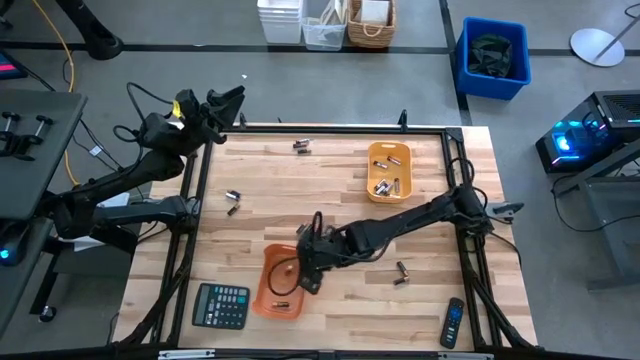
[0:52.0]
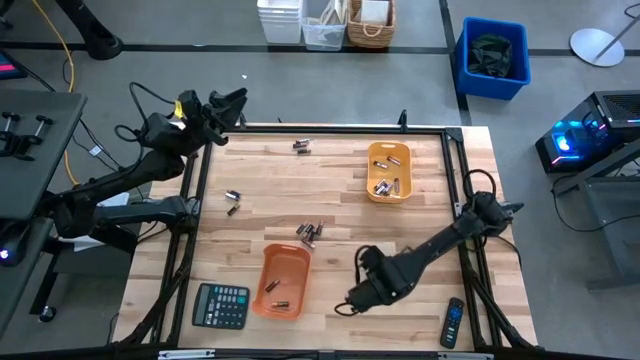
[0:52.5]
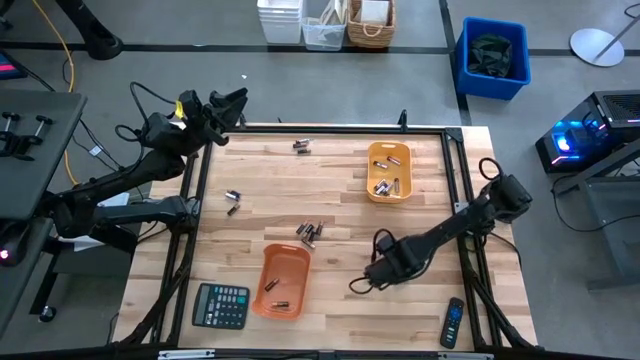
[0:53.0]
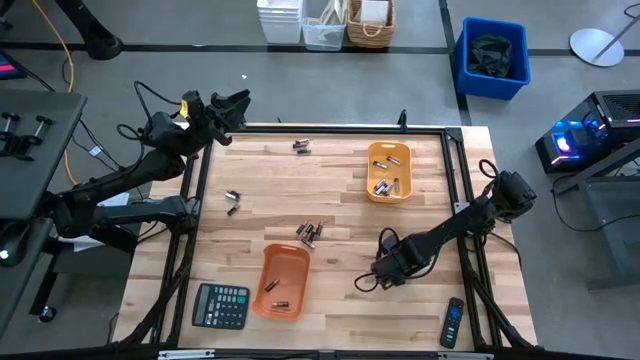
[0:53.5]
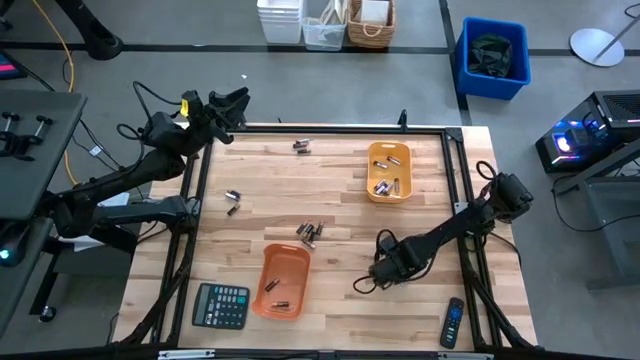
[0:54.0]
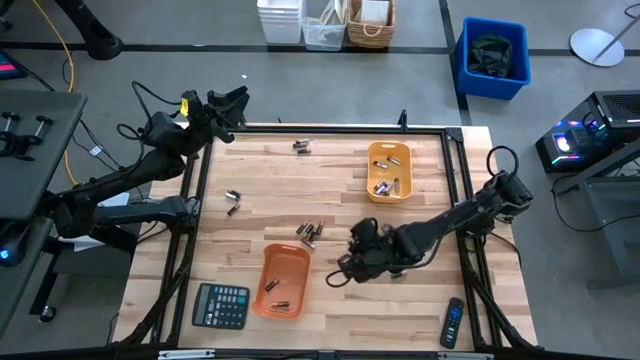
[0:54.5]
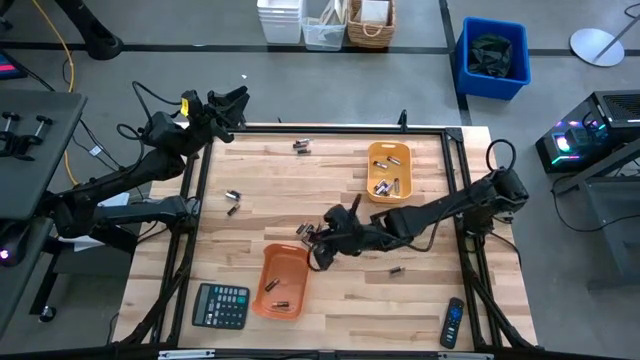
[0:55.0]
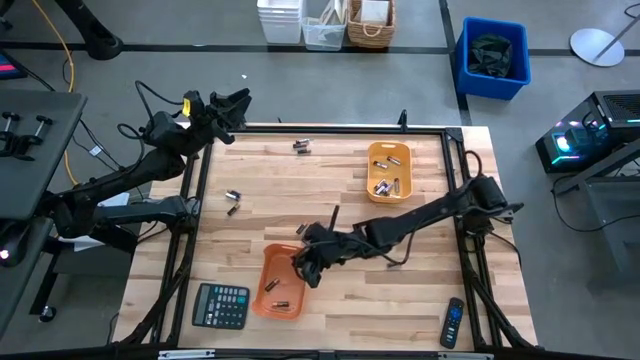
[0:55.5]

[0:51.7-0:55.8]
Task: Sort batteries
Put the black battery into the orange bin

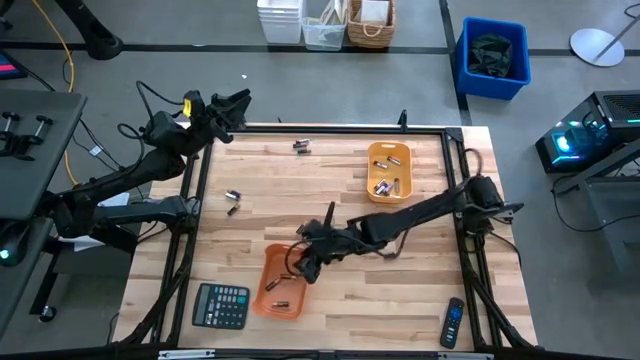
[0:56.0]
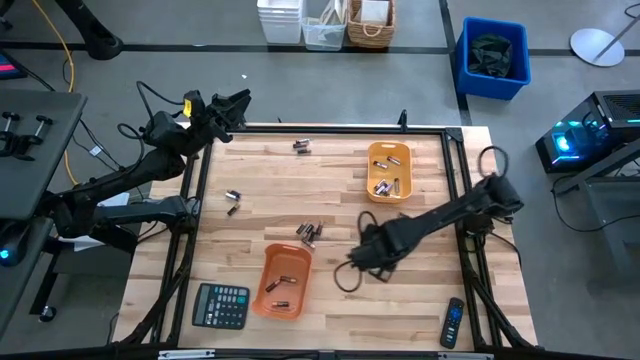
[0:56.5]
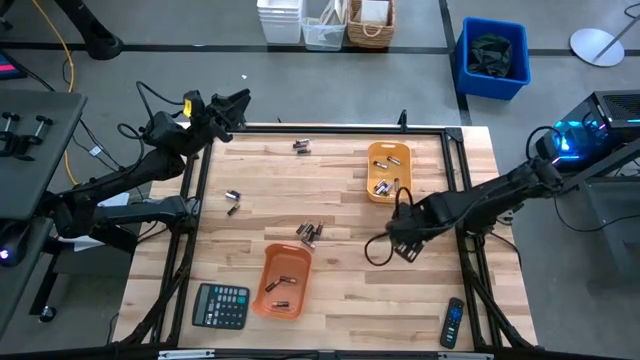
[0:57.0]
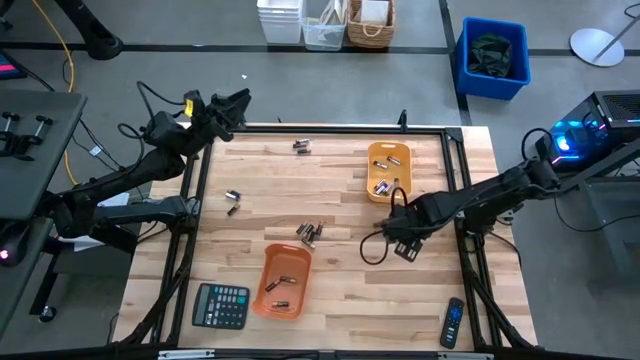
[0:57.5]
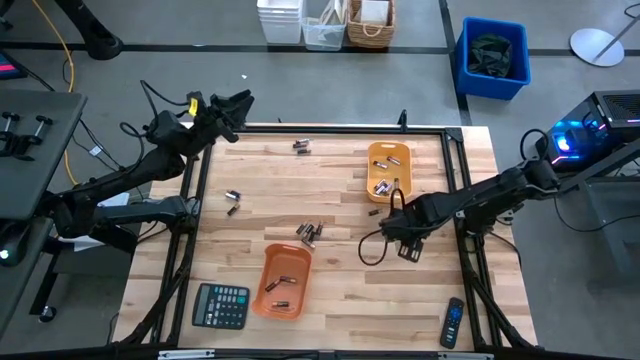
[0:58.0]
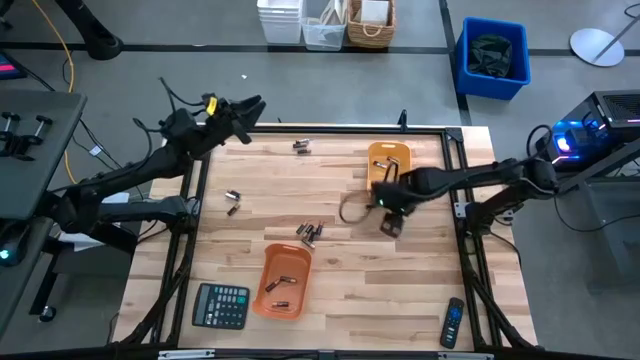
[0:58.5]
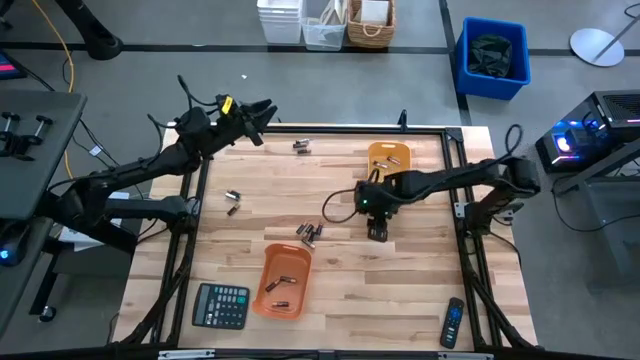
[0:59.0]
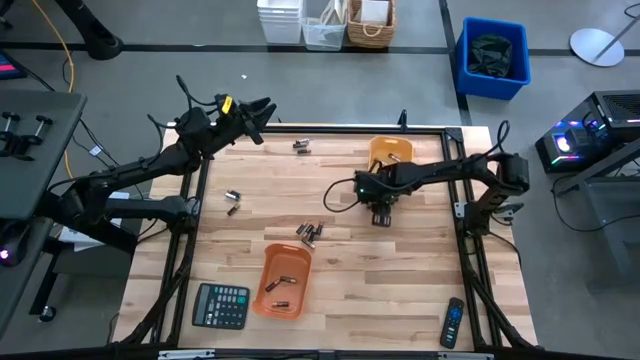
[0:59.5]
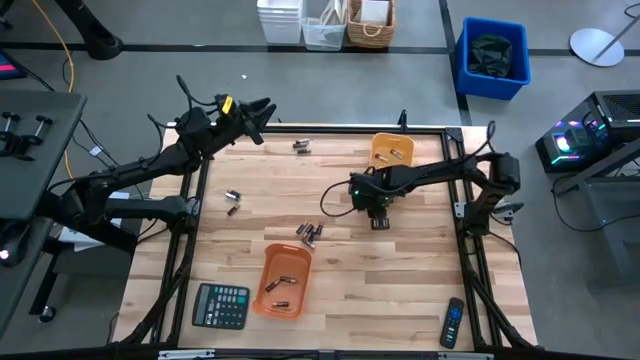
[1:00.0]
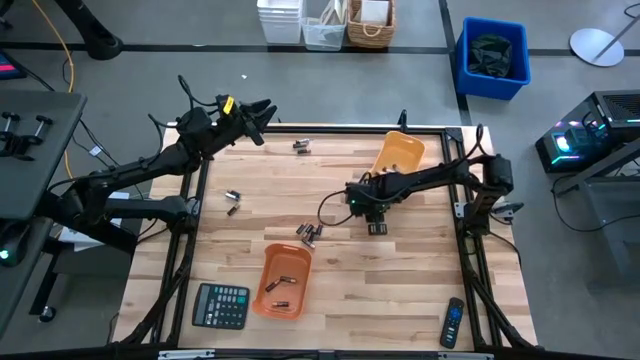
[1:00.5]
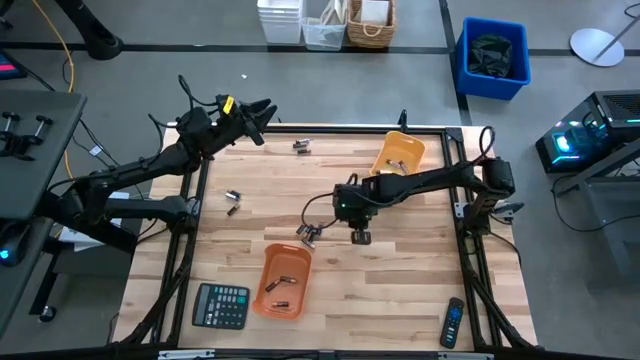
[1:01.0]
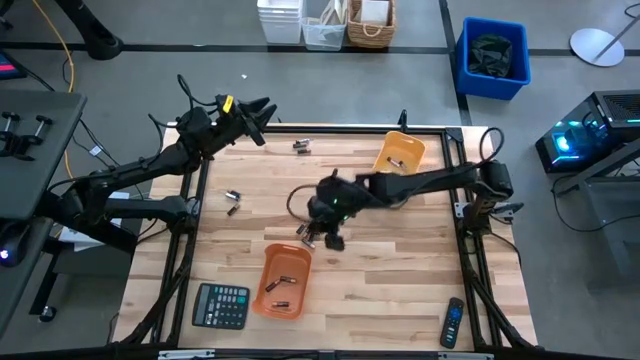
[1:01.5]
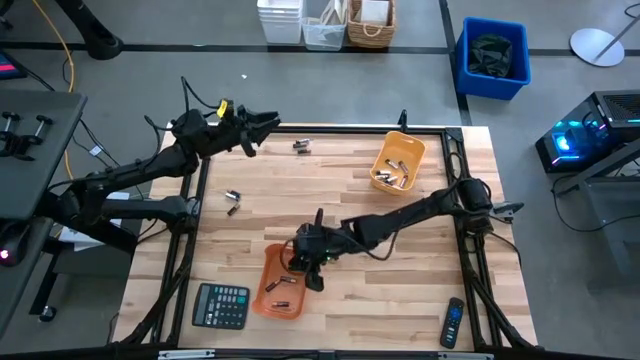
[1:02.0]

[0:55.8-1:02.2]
Put the black battery into the orange bin

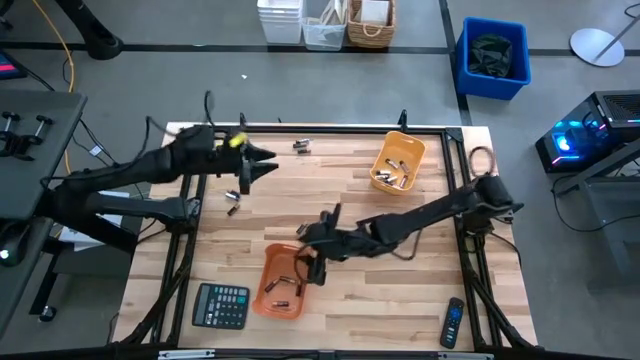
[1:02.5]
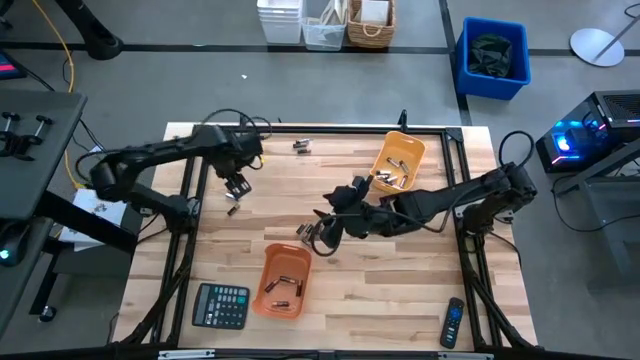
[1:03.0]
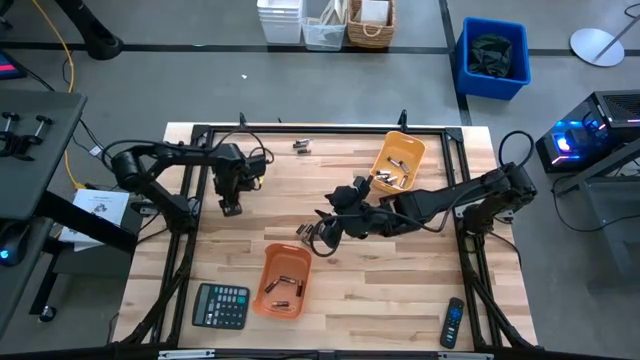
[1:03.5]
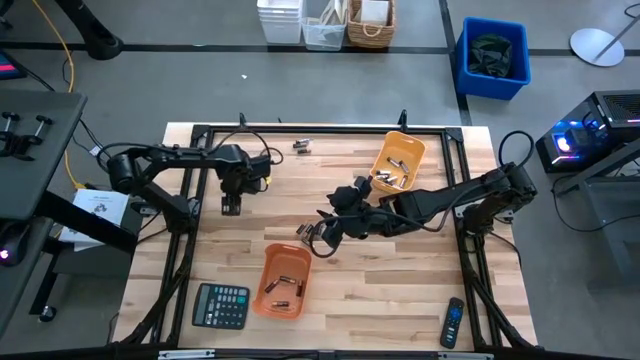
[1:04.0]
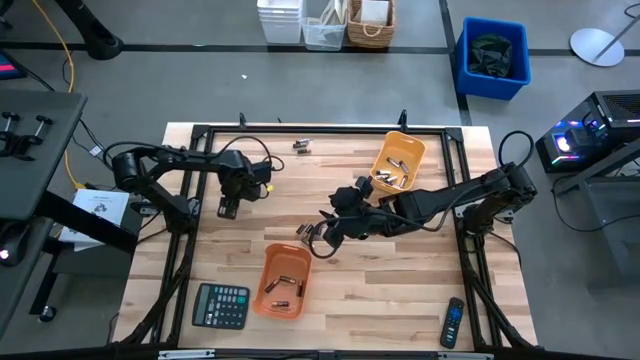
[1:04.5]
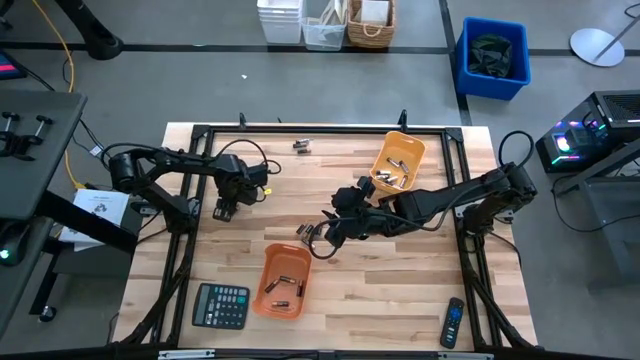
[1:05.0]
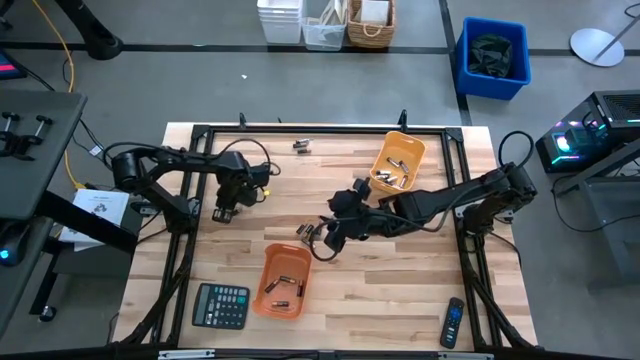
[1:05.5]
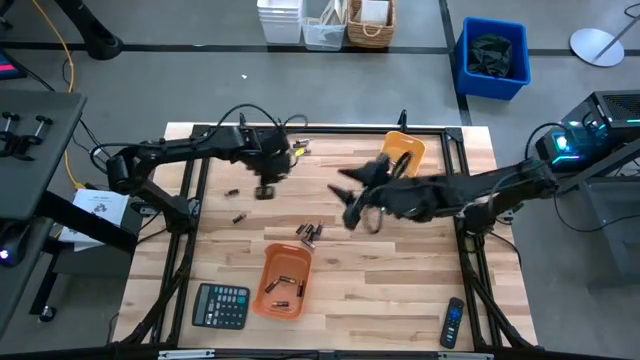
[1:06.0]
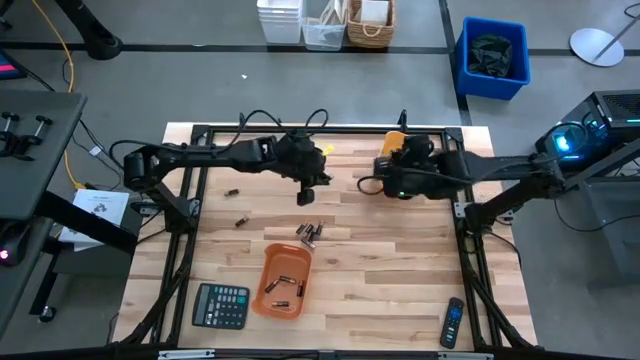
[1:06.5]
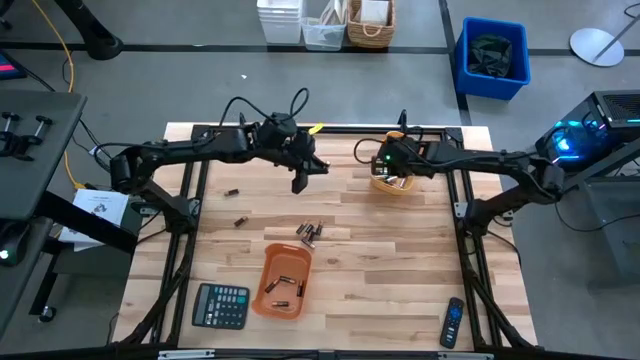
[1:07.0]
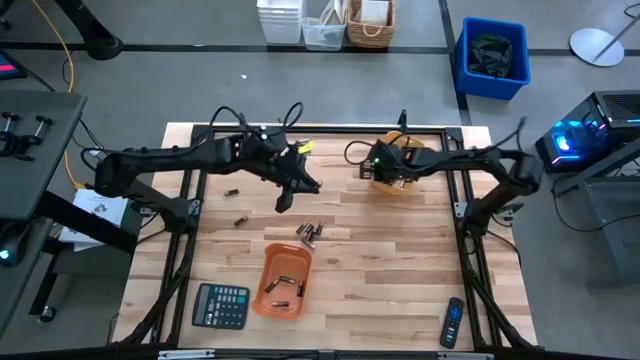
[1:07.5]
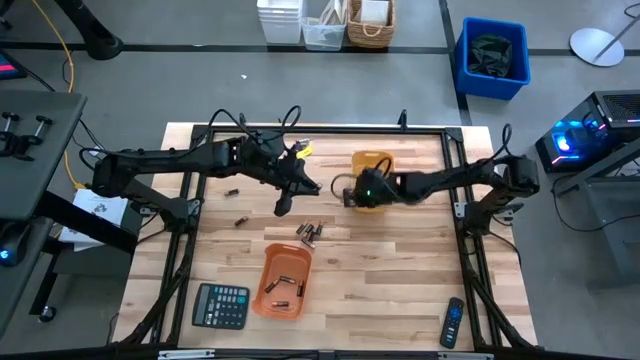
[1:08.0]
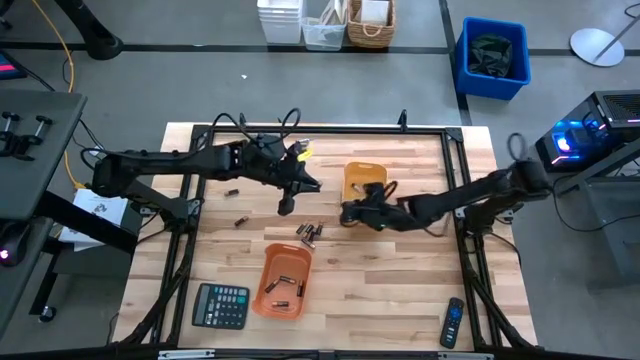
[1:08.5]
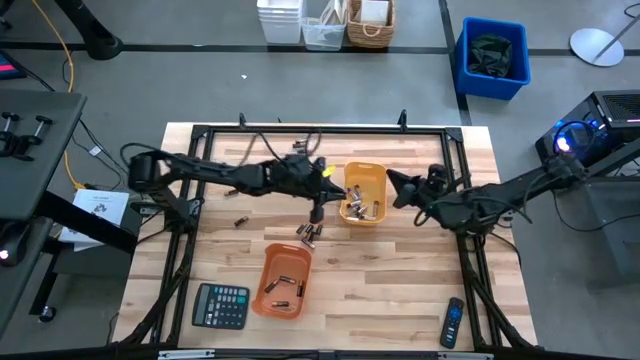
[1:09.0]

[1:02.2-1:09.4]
Put the silver battery into the yellow bin

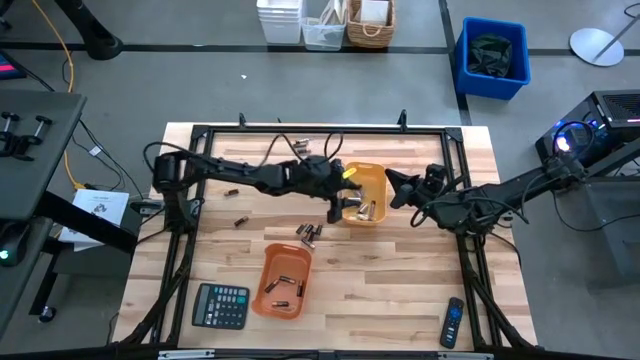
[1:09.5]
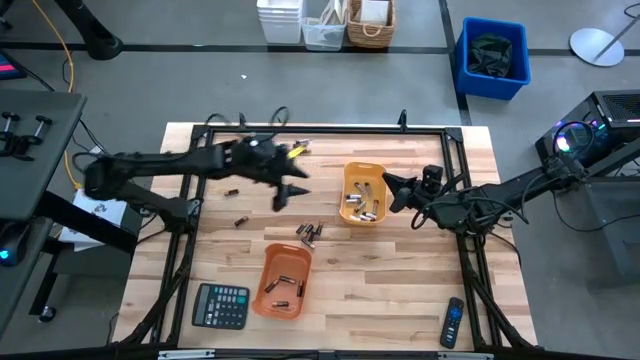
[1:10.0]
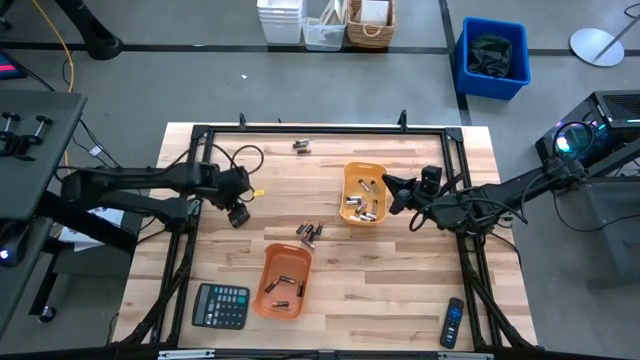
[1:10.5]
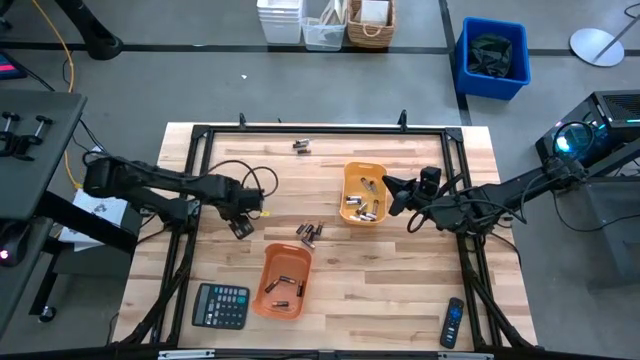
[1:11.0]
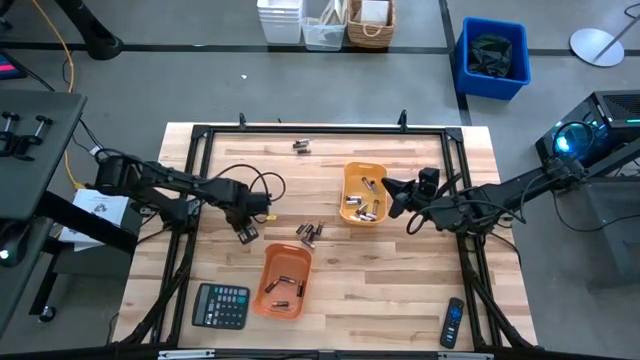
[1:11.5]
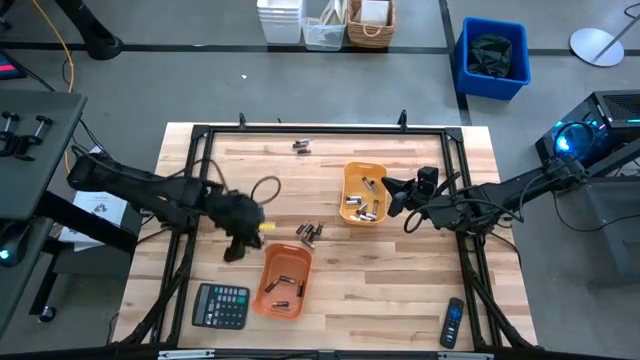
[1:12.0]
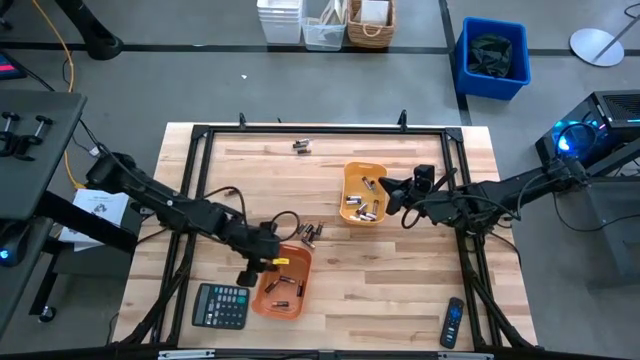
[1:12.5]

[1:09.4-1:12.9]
Put the black battery into the orange bin

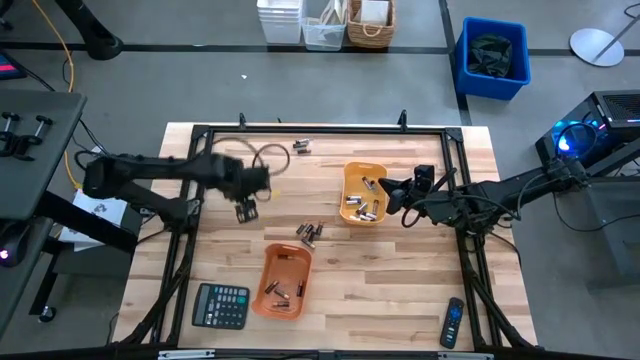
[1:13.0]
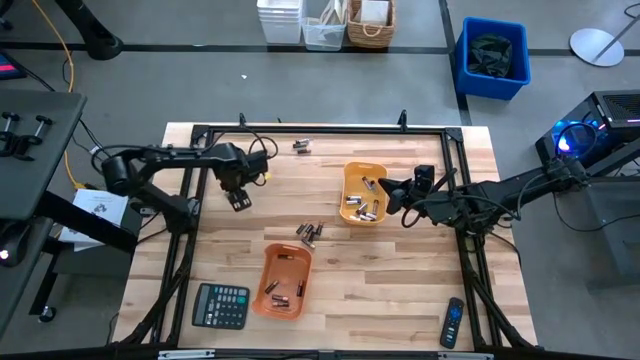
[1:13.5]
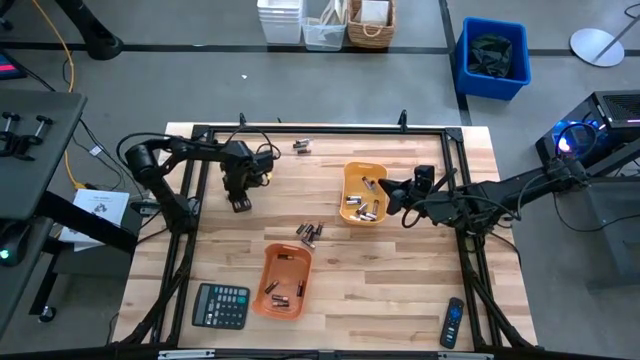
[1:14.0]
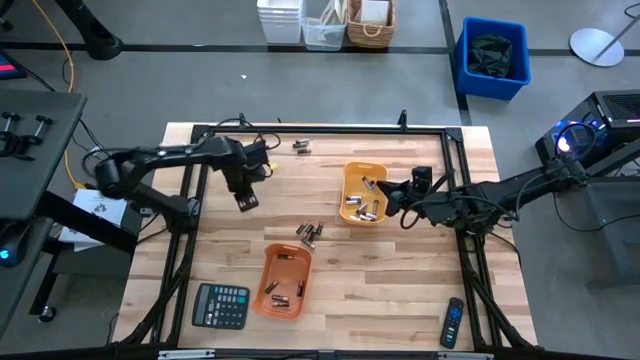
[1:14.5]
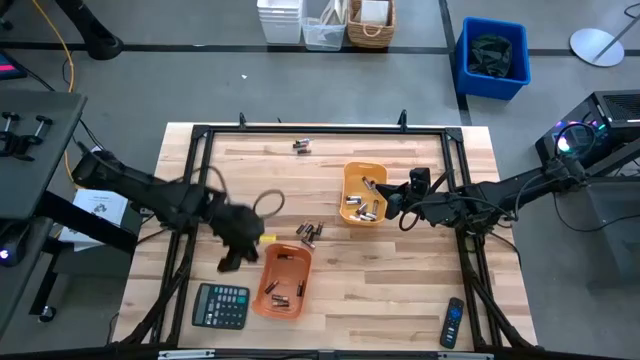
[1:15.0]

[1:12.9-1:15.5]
Put the black battery into the orange bin
